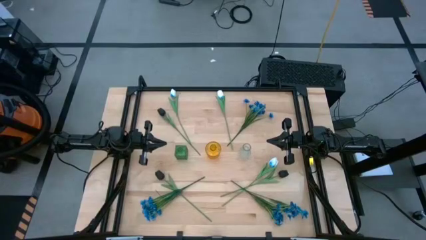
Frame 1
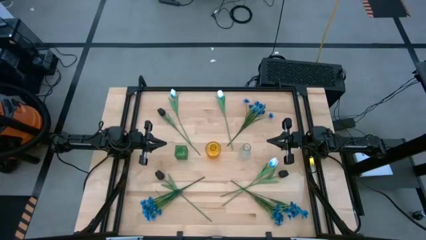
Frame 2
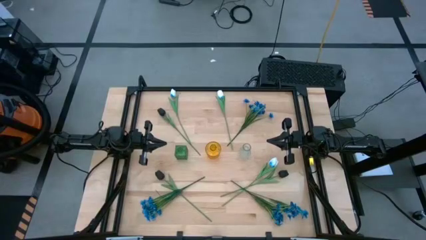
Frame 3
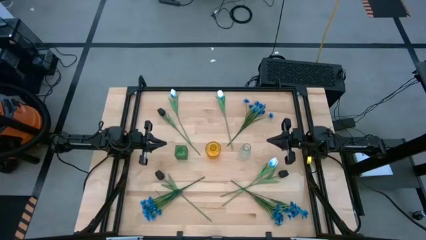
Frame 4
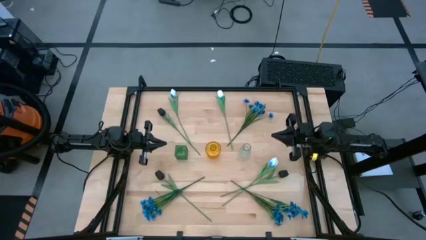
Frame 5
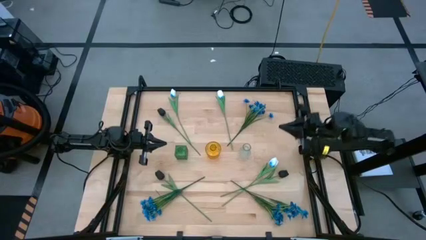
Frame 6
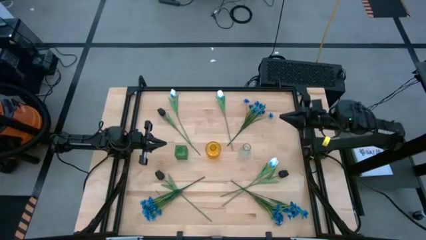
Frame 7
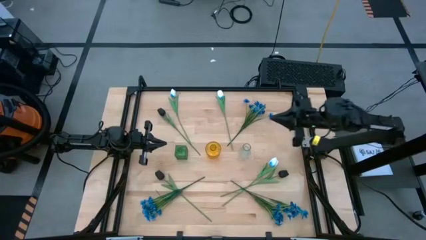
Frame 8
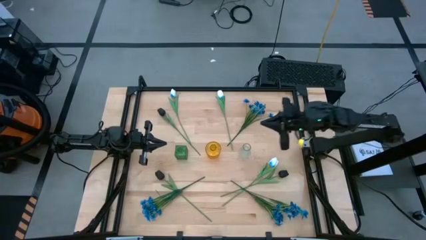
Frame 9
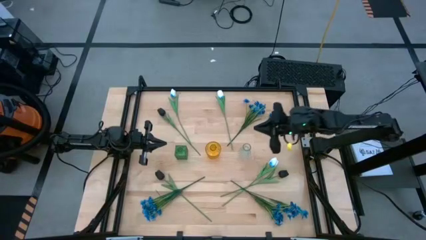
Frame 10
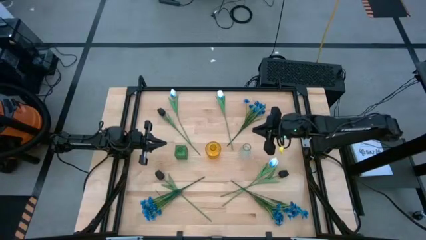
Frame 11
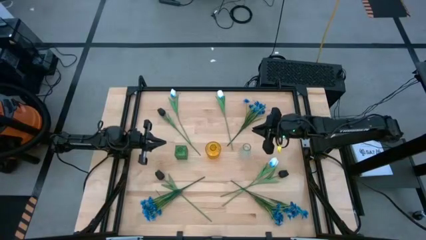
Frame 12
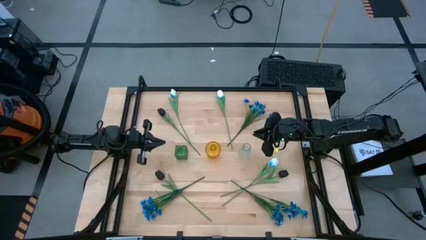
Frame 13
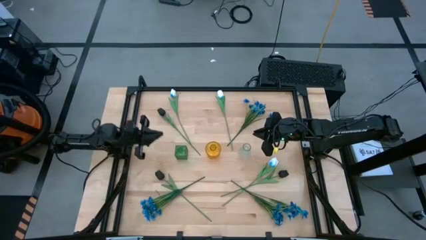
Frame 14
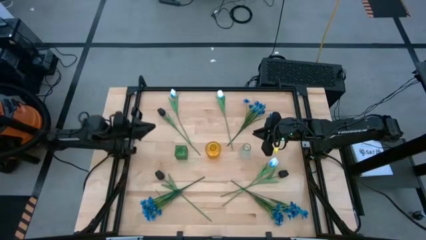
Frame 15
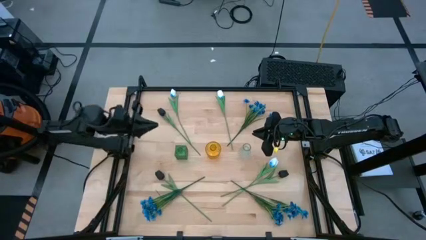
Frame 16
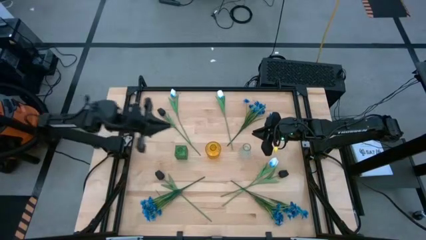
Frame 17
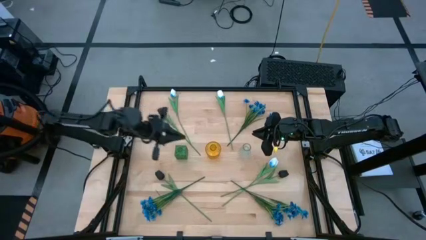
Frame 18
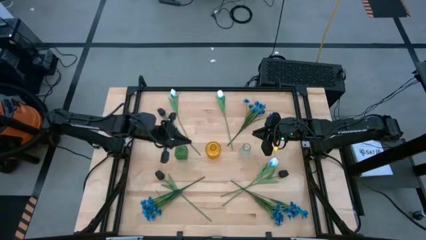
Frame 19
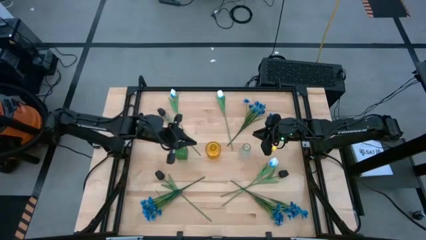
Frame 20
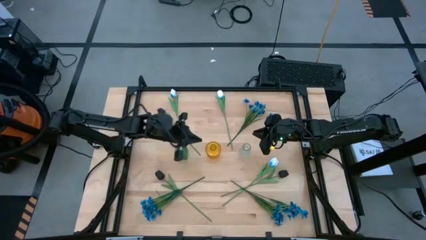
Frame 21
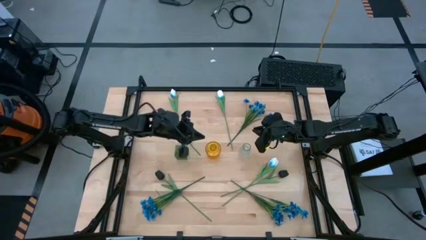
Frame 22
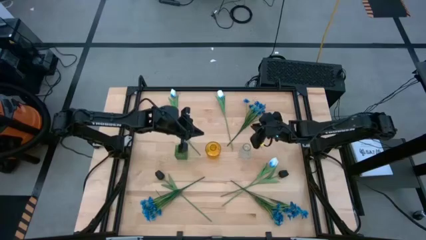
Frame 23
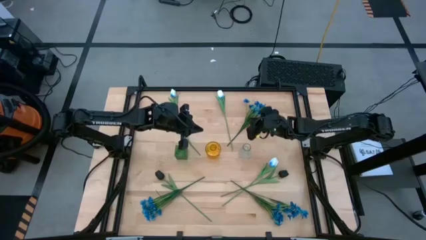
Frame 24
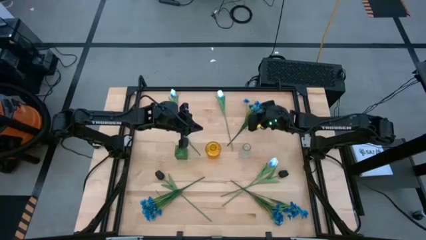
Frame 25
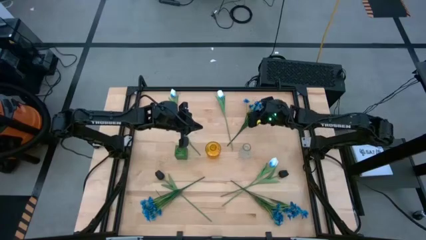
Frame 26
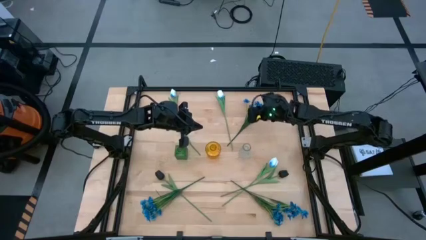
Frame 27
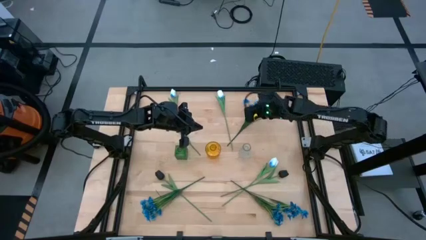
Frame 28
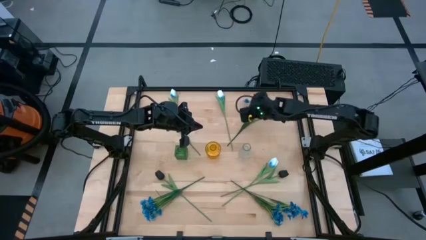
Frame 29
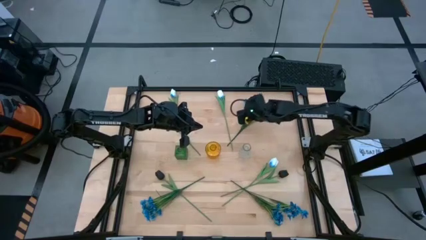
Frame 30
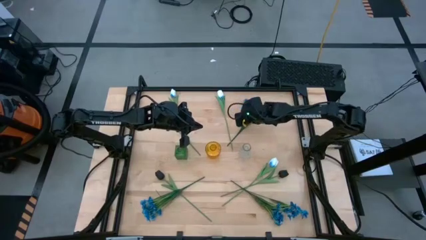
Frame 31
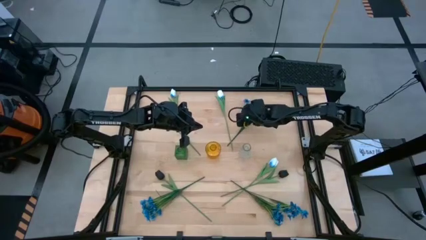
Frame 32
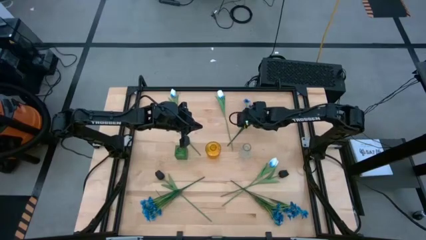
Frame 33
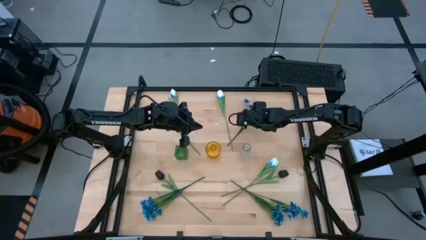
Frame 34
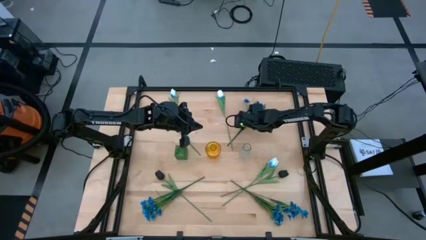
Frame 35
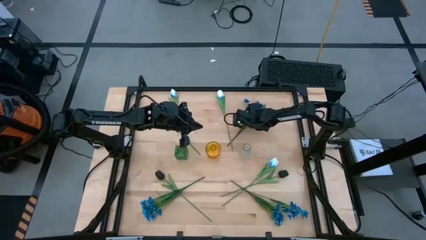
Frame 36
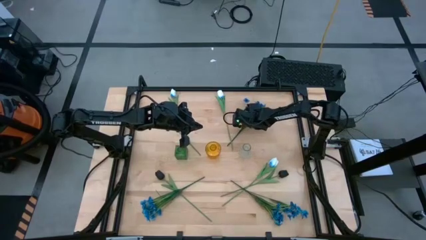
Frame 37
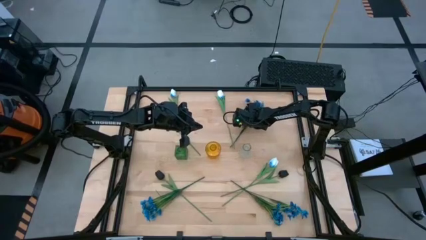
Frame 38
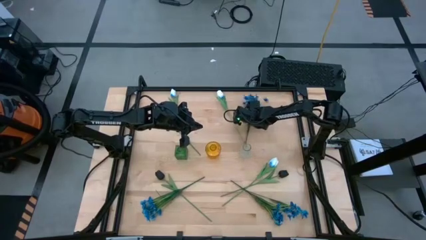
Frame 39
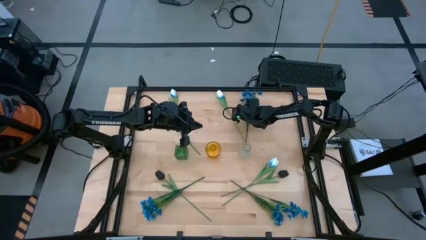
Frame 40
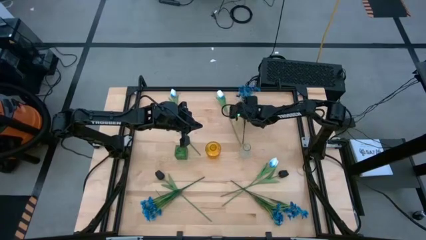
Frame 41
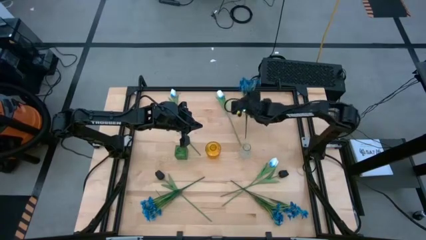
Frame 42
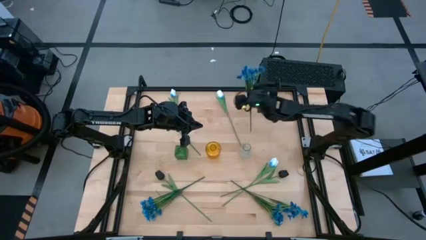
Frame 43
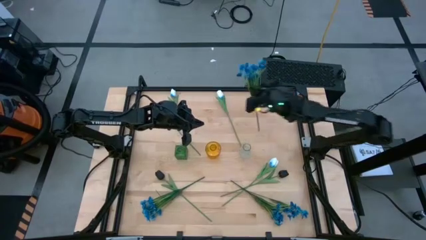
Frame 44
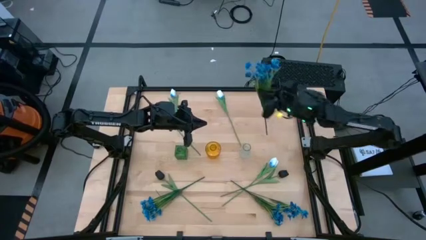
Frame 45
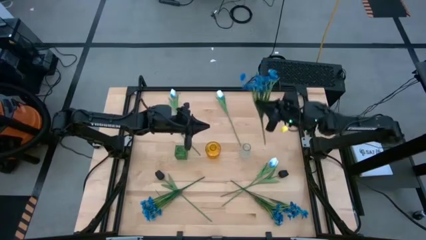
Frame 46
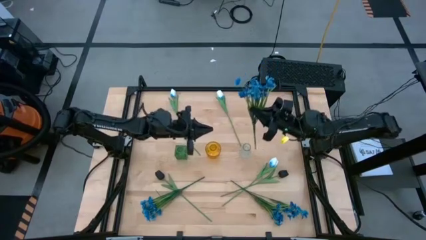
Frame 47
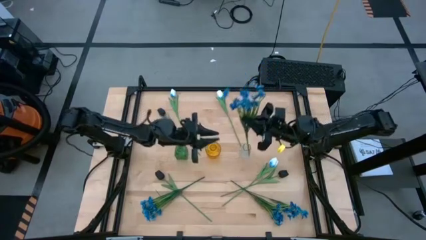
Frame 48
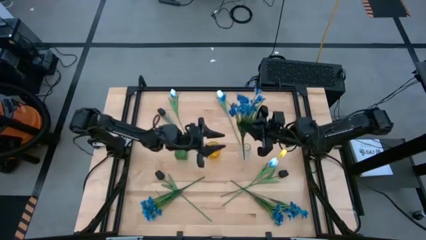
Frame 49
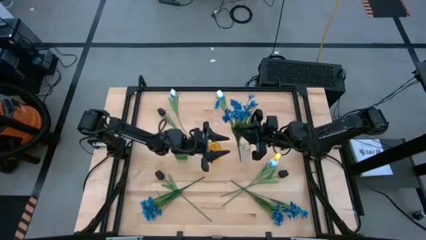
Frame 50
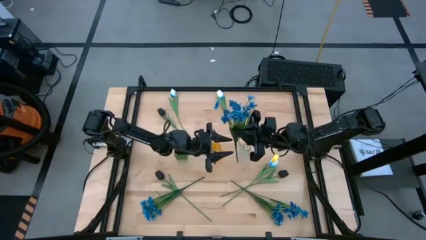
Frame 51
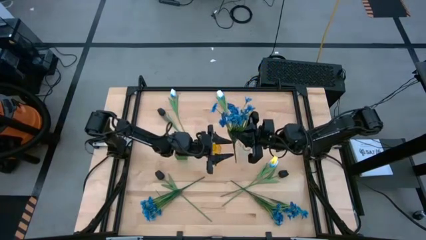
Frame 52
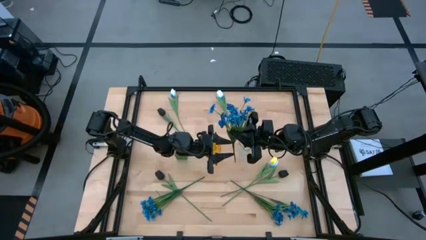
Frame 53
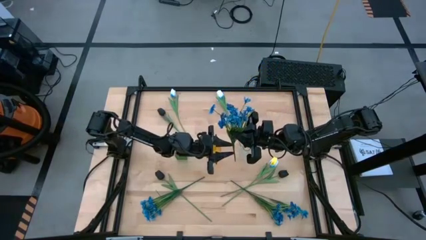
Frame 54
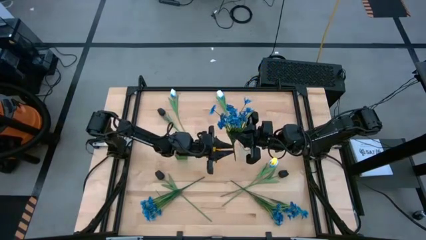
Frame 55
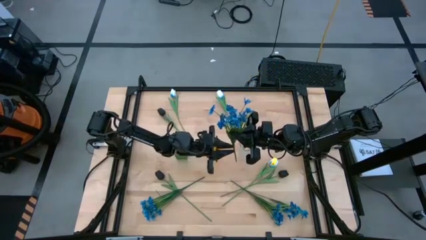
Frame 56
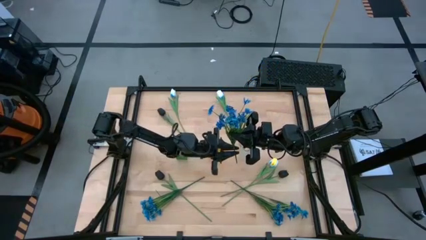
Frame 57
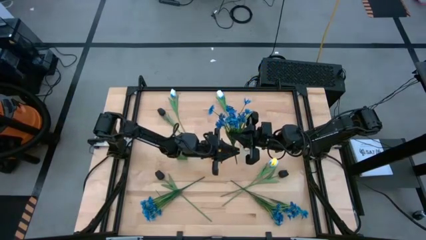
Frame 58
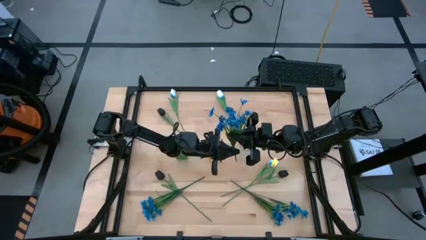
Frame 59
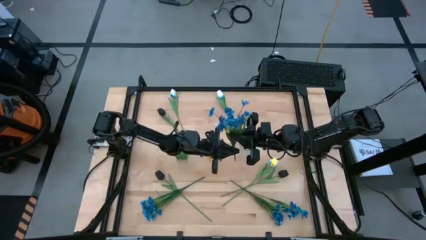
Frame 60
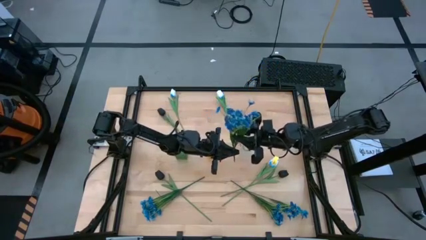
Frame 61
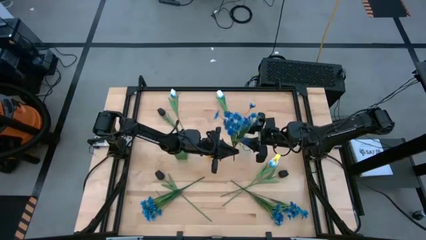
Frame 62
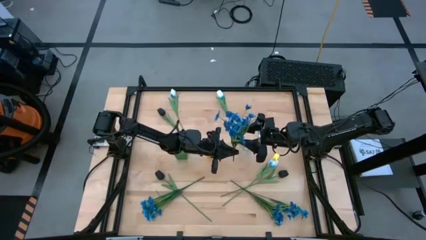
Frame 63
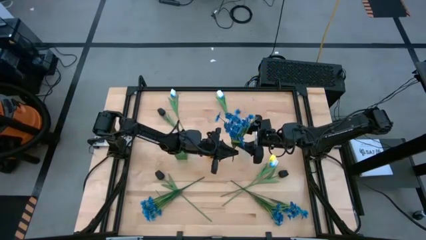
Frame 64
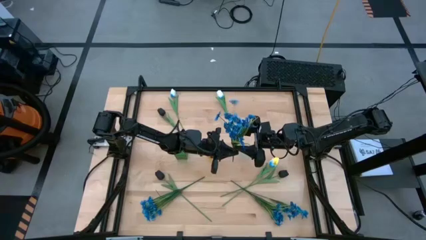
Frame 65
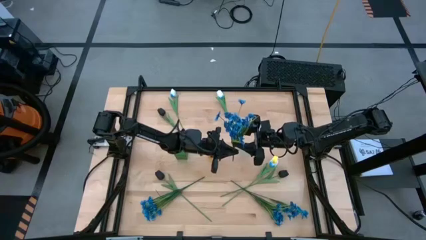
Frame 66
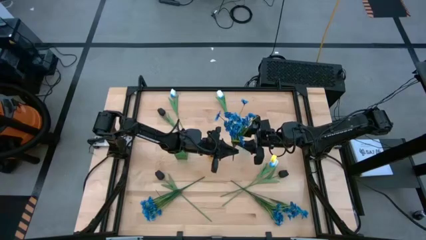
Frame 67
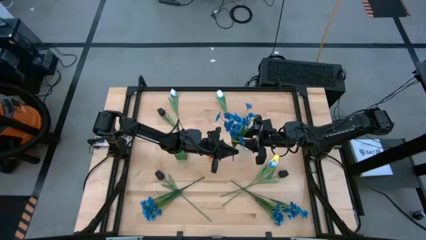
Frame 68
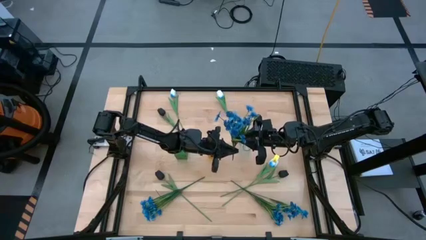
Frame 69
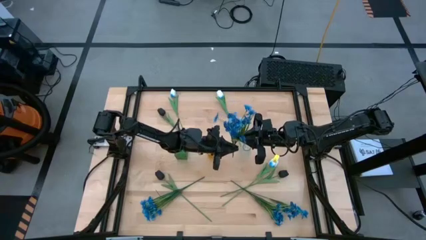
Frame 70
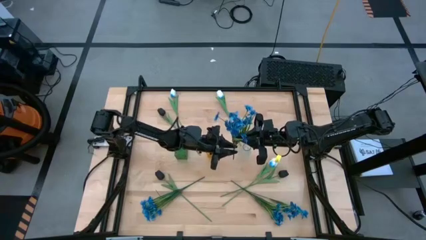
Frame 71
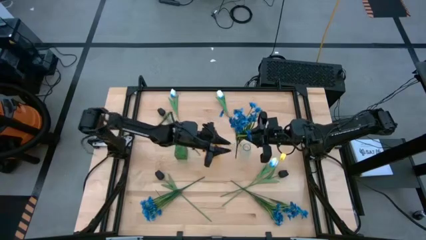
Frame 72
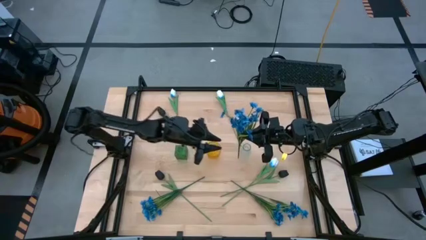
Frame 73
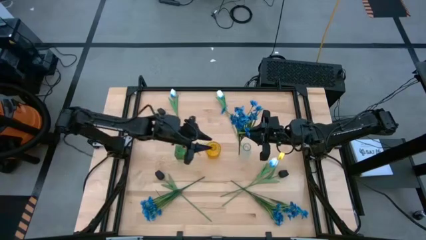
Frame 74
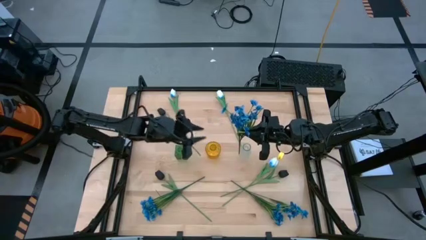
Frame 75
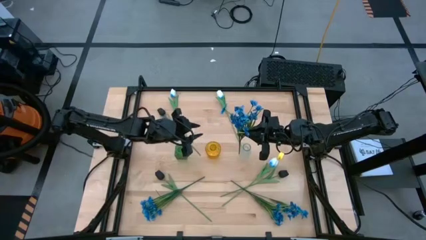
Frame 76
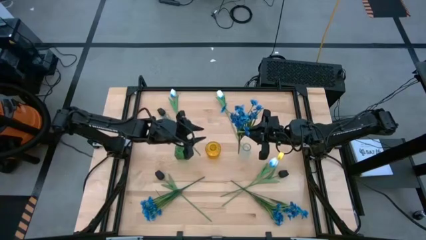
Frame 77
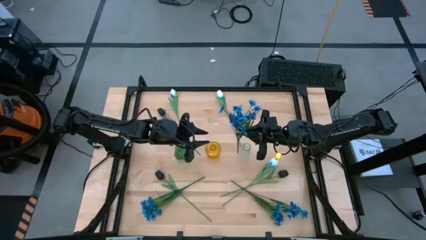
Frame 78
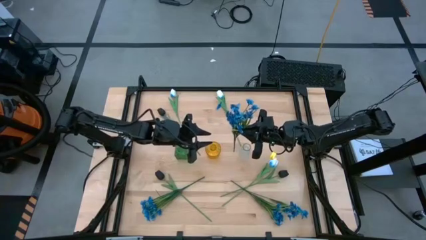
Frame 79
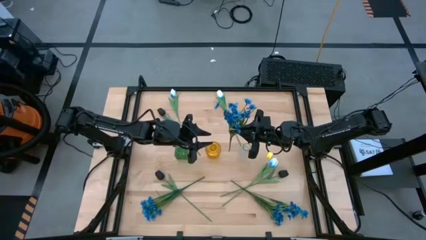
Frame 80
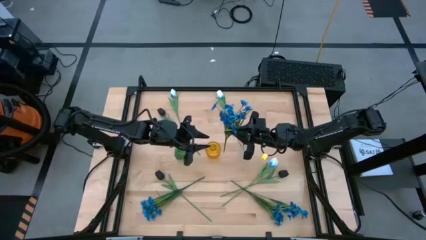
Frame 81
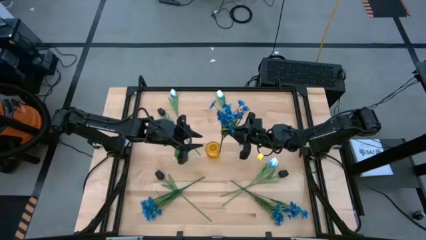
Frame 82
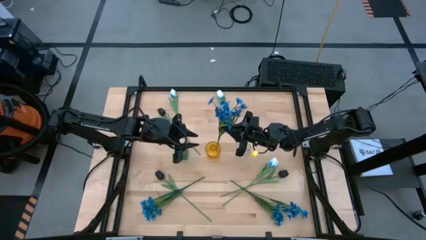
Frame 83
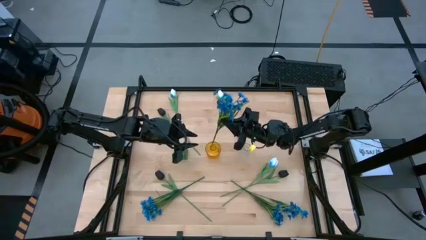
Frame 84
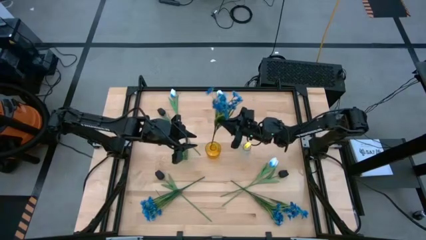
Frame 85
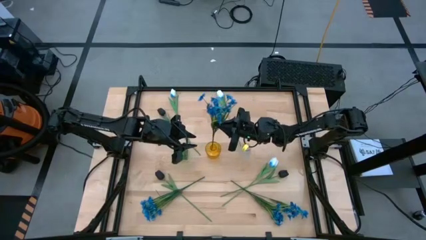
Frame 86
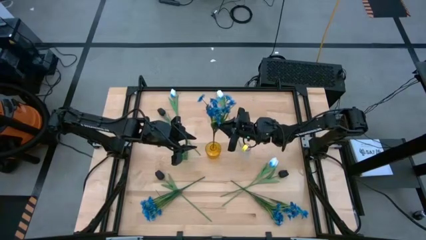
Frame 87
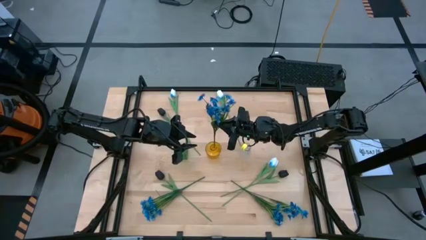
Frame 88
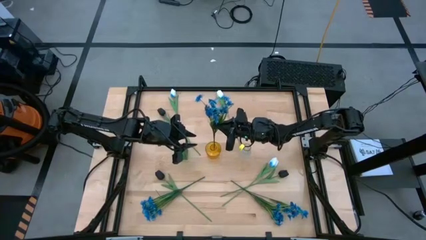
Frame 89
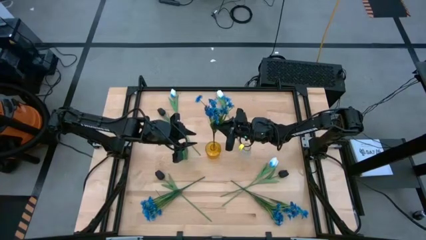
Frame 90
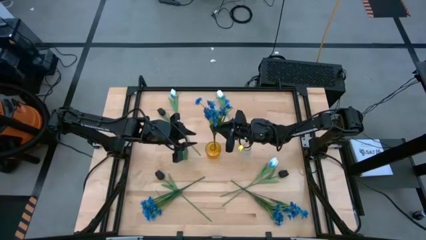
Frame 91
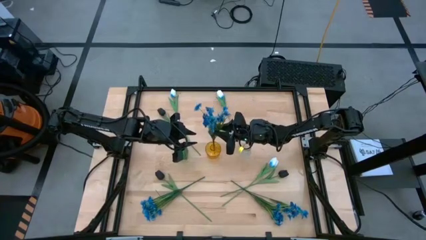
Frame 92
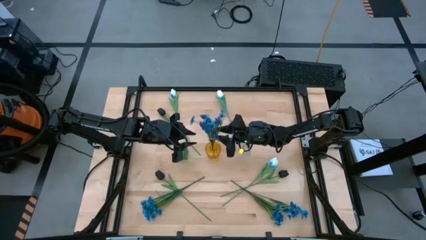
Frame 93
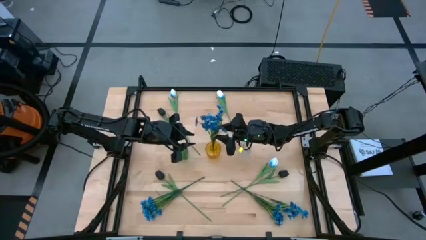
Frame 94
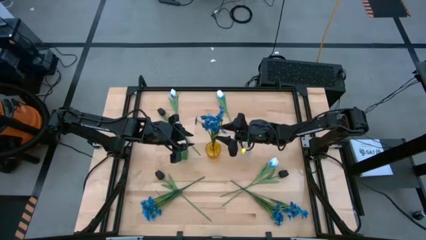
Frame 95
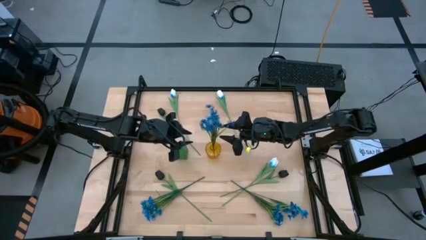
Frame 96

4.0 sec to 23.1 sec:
Task: Sort flowers into vase by color
Put the top right blue flowers into the yellow vase
